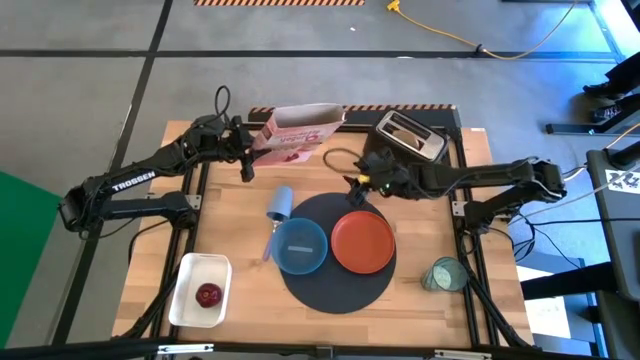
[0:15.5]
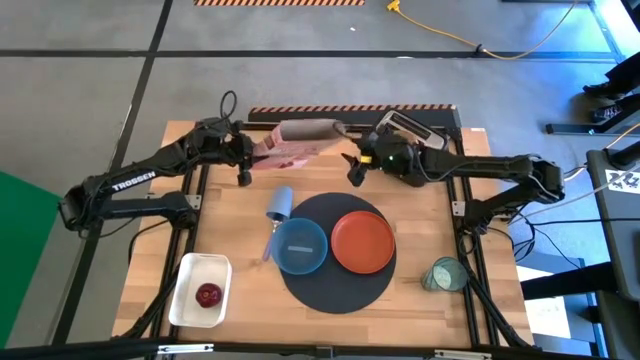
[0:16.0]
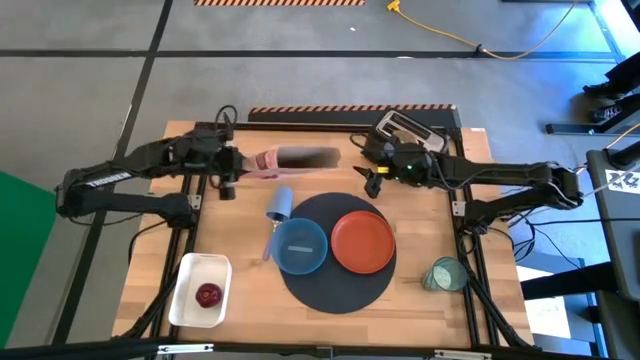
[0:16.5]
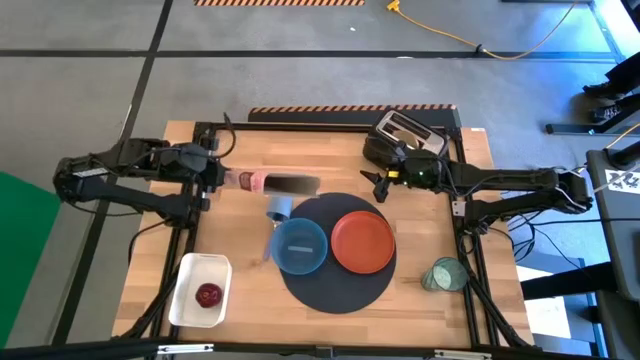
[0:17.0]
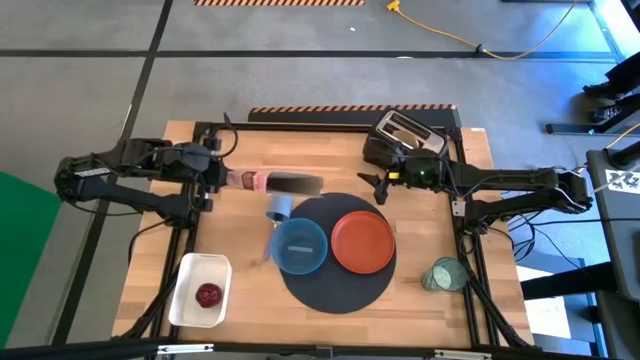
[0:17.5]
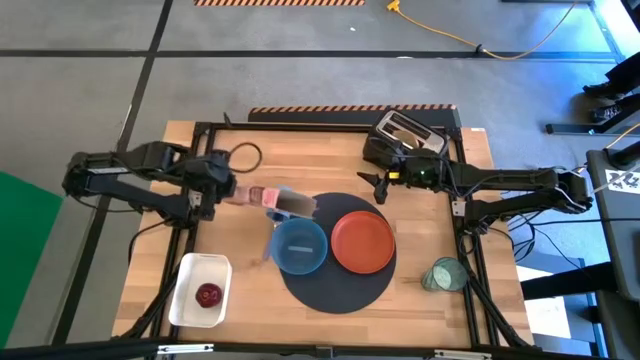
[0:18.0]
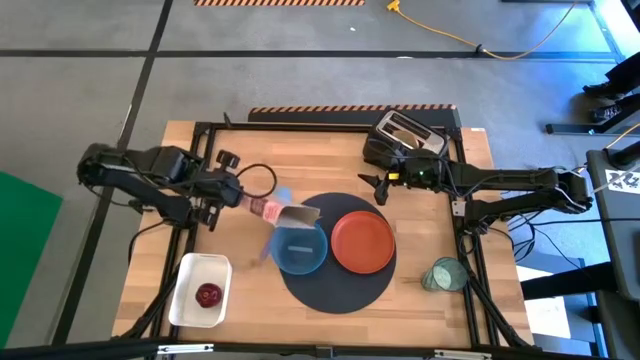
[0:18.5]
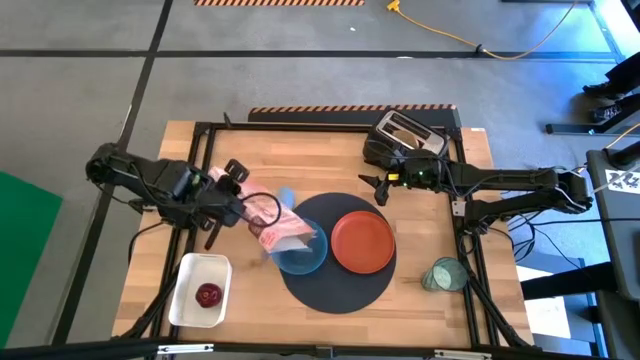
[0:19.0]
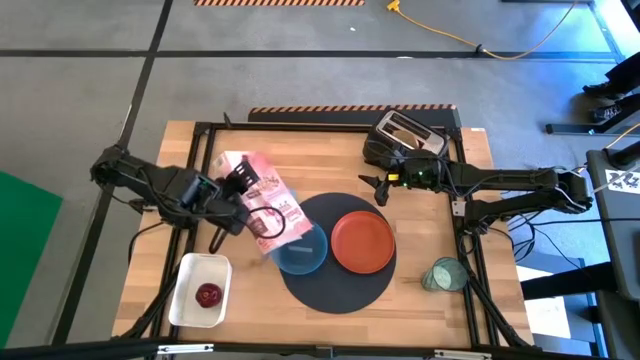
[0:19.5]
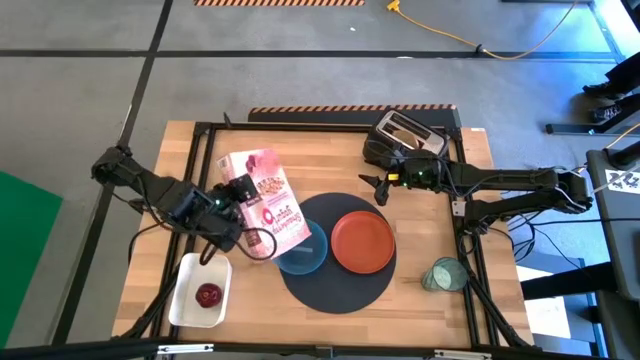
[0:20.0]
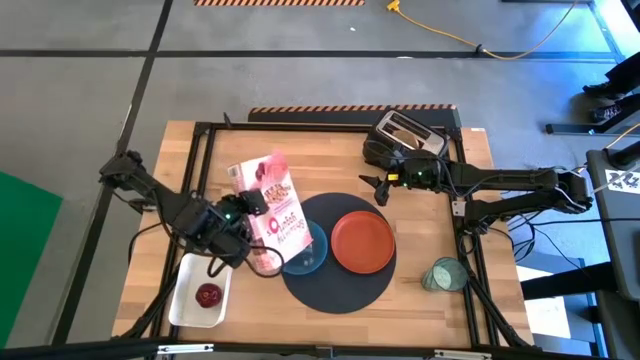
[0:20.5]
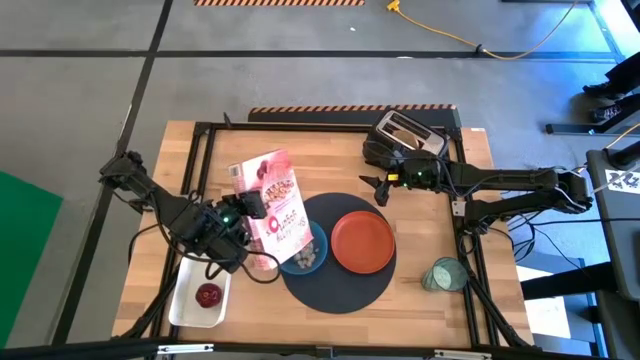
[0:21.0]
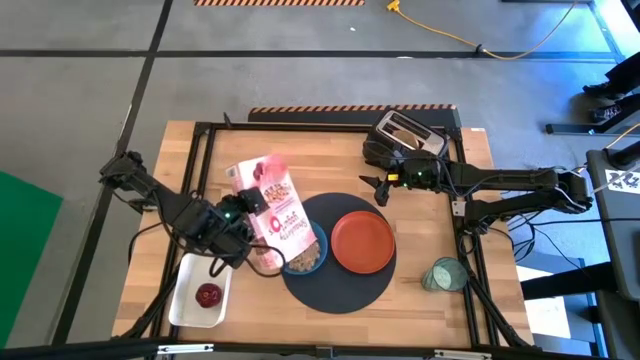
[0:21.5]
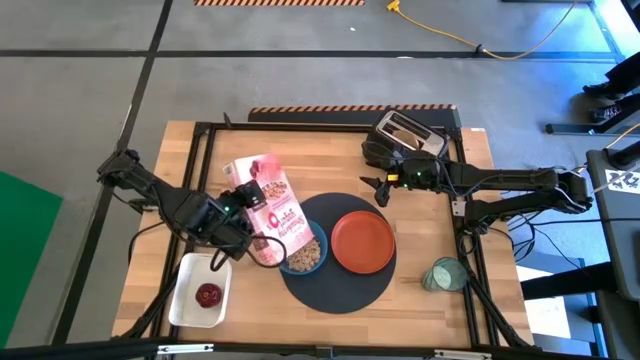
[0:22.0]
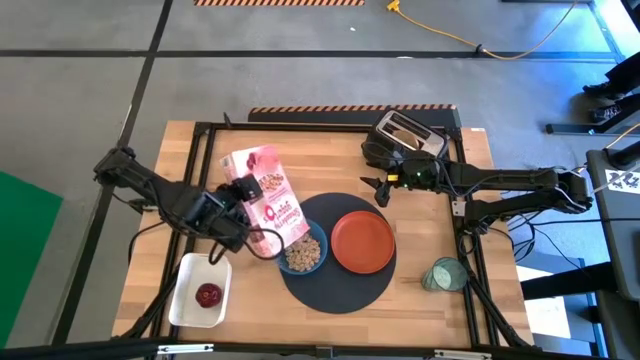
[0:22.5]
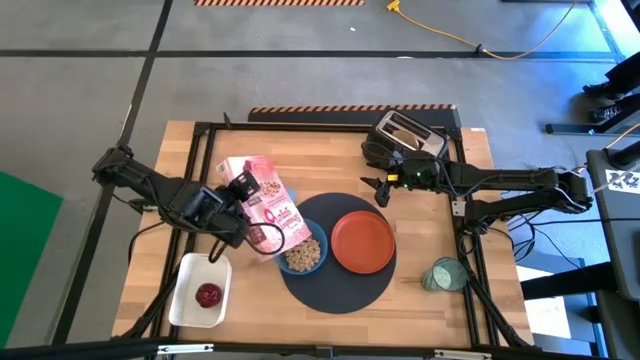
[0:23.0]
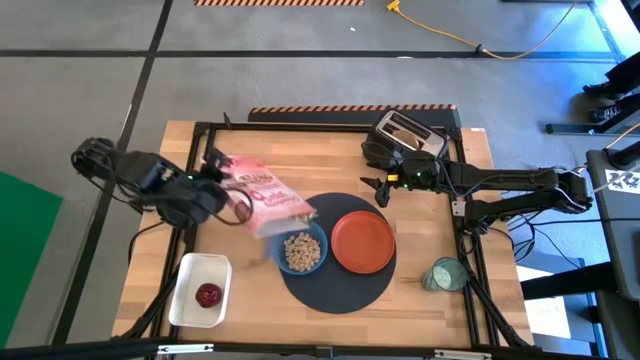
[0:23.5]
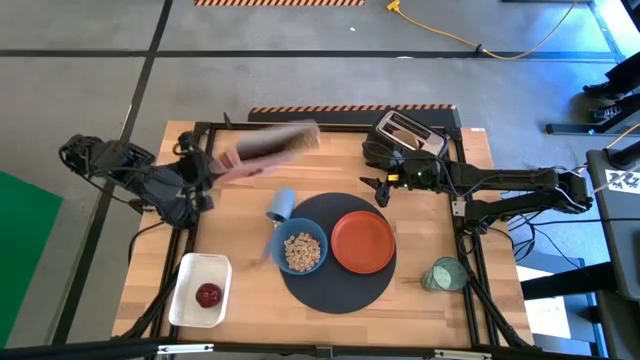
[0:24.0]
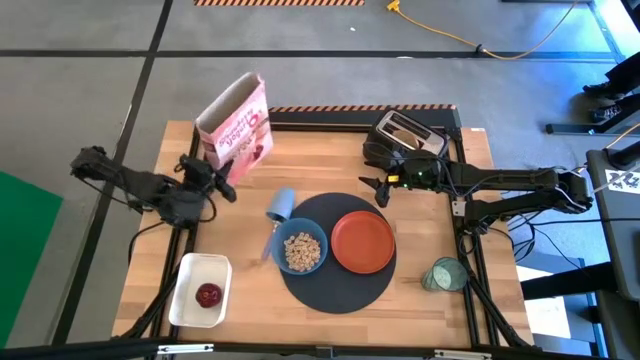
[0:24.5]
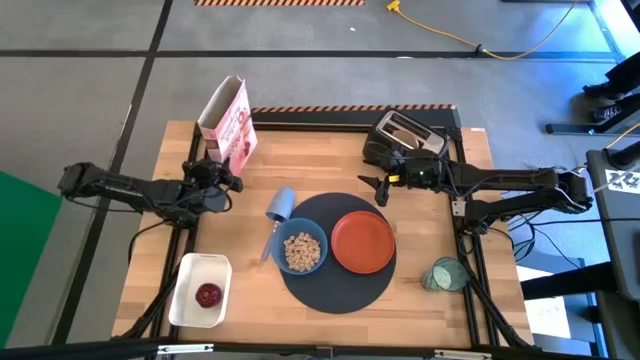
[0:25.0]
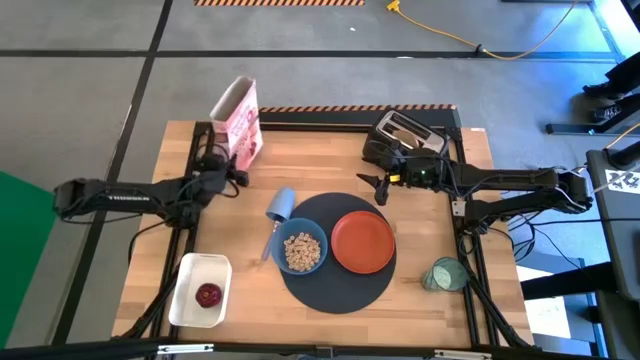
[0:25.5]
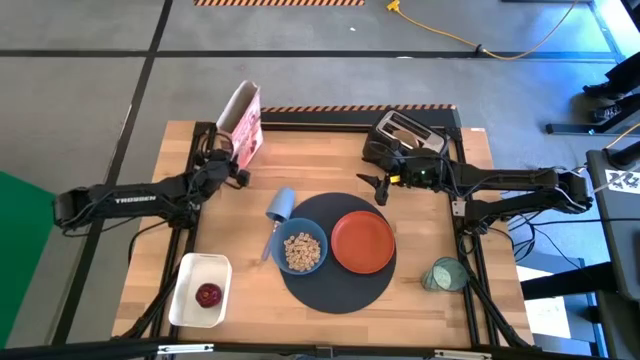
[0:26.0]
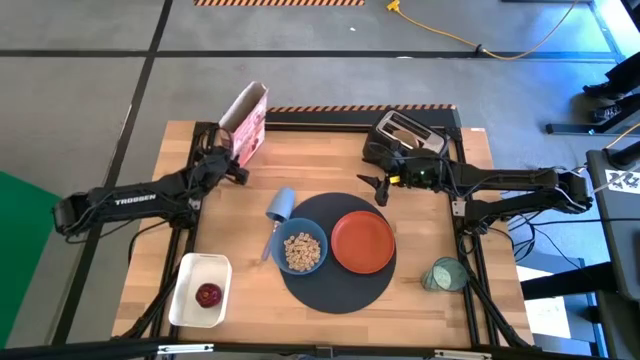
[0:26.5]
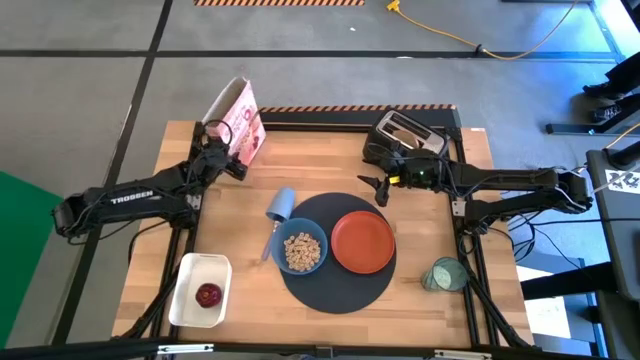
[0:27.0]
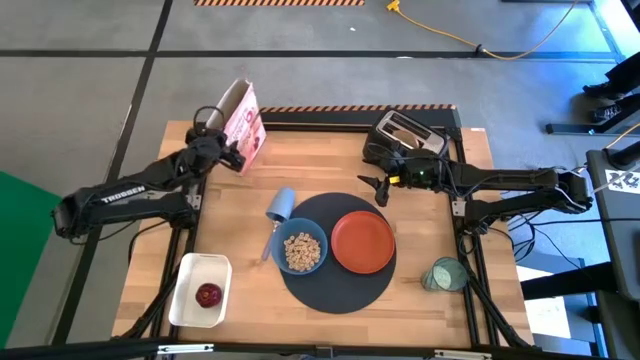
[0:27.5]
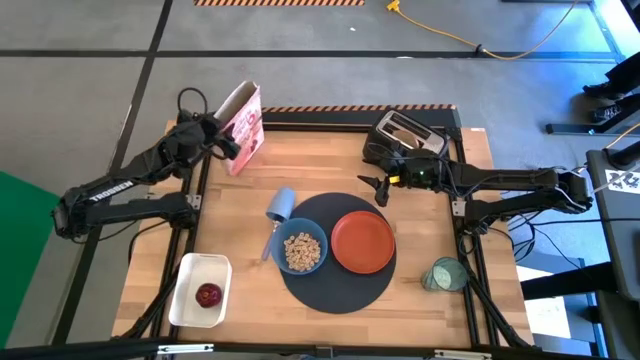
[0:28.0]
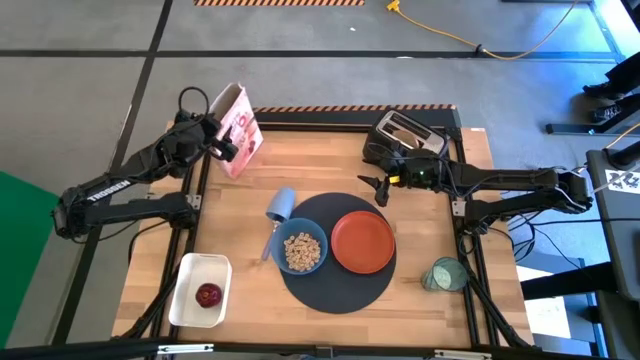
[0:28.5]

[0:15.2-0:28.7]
Task: Arrange a breakfast setting
Pour the cereal from the cereal box into the blue bowl

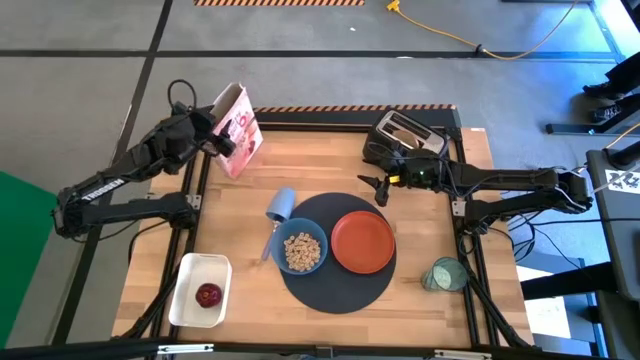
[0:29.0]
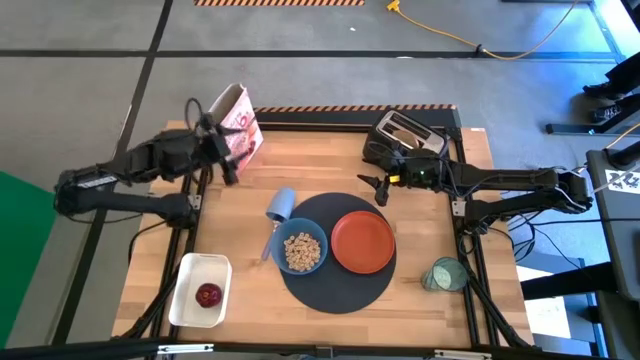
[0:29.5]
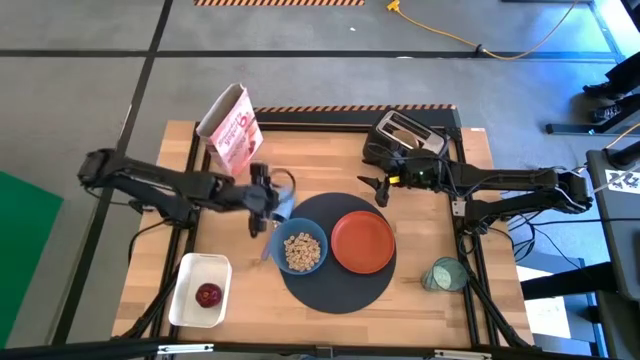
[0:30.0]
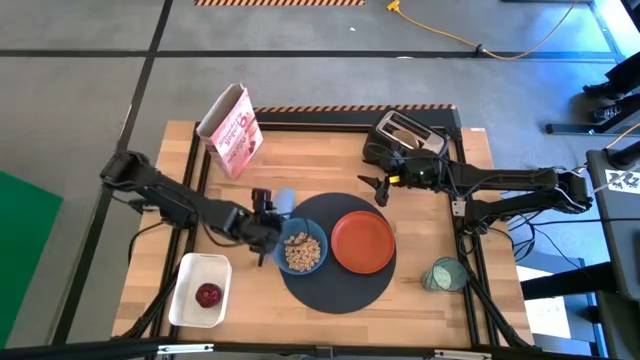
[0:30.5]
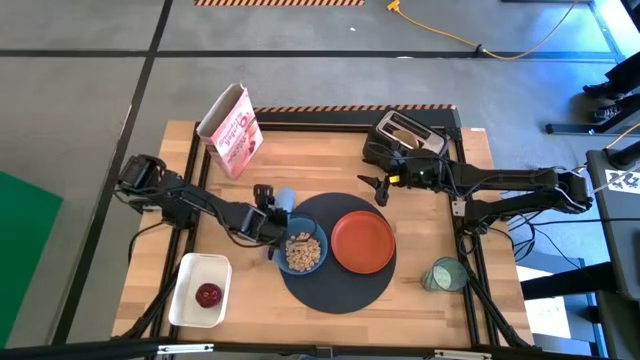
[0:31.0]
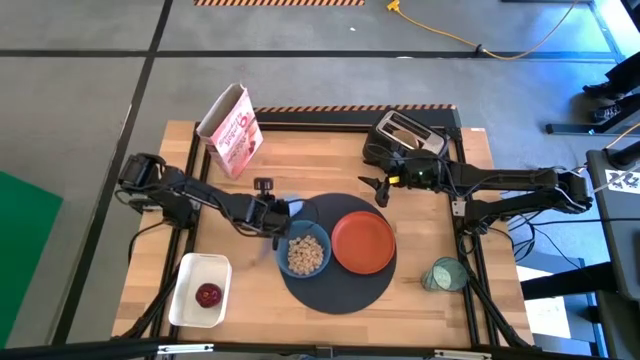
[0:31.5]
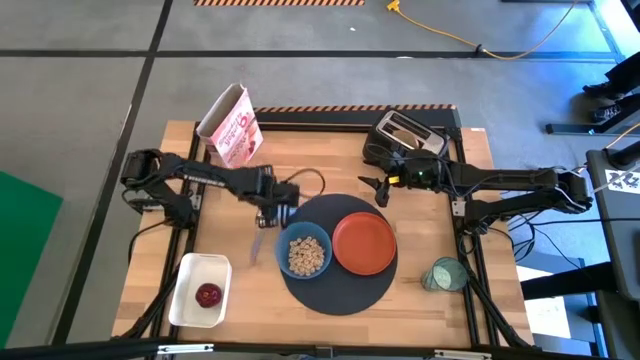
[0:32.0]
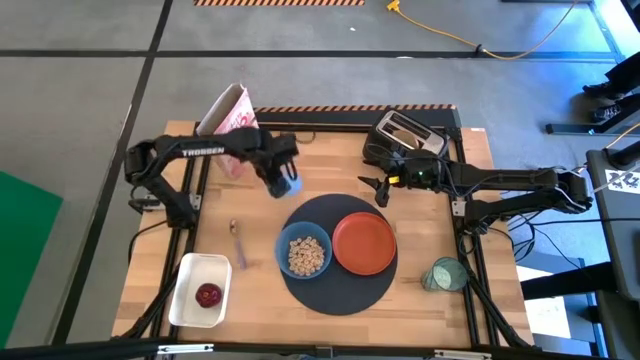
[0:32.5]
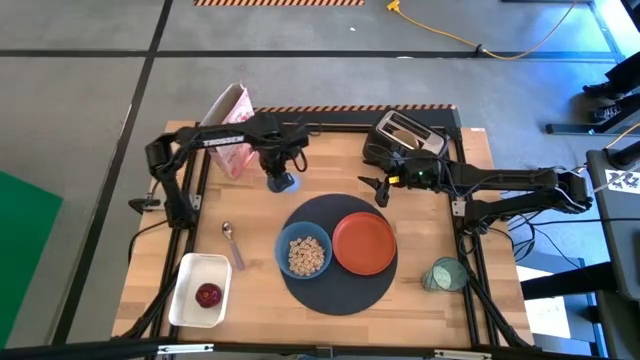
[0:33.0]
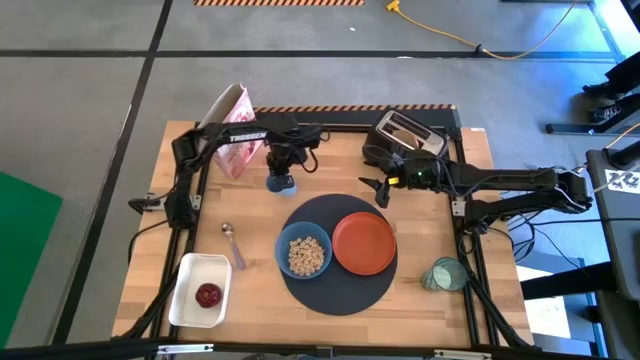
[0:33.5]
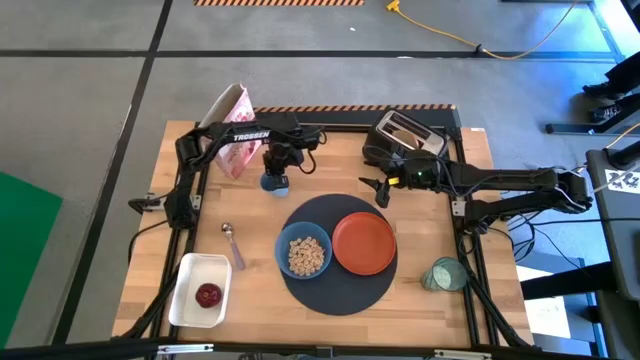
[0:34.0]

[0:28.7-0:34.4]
Adjust the blue cup

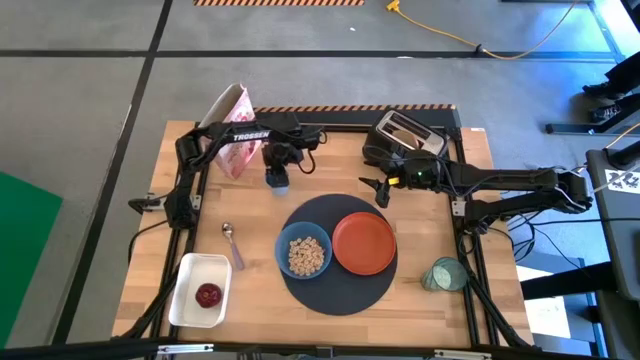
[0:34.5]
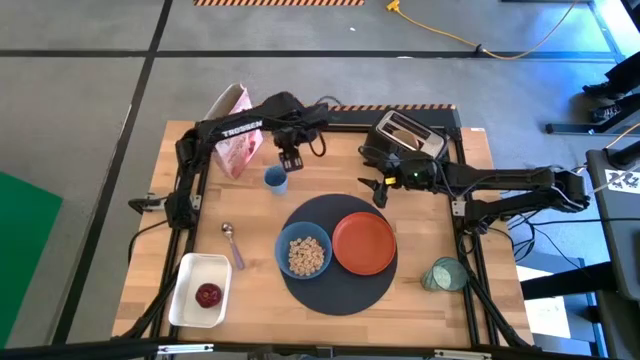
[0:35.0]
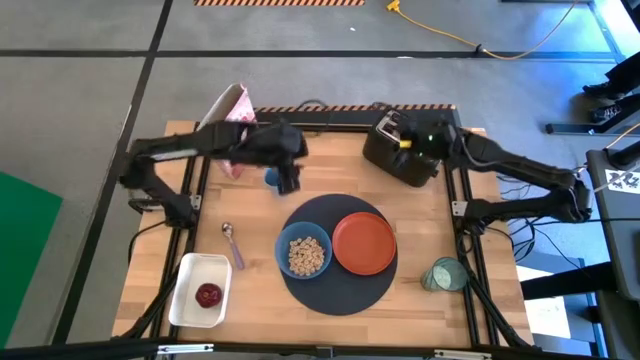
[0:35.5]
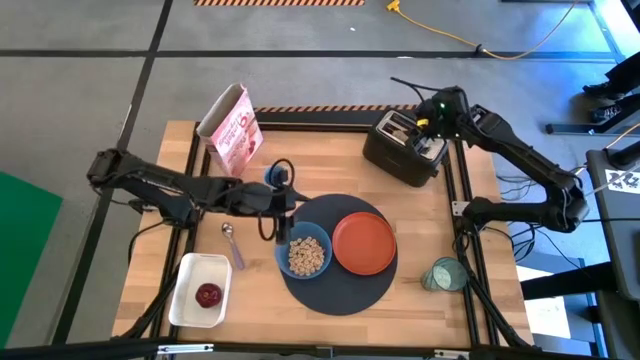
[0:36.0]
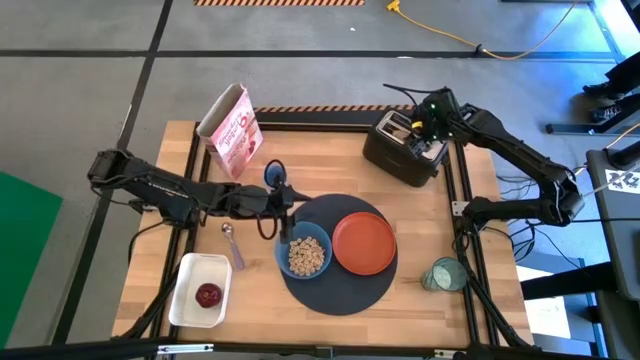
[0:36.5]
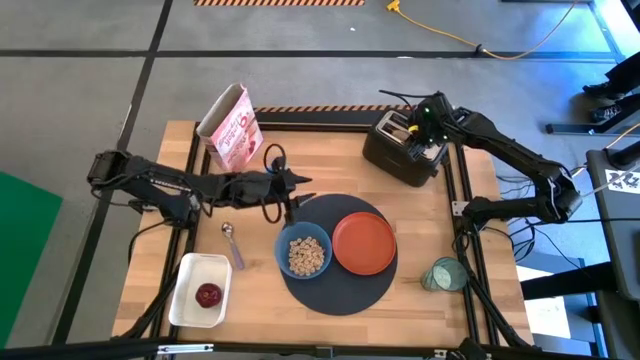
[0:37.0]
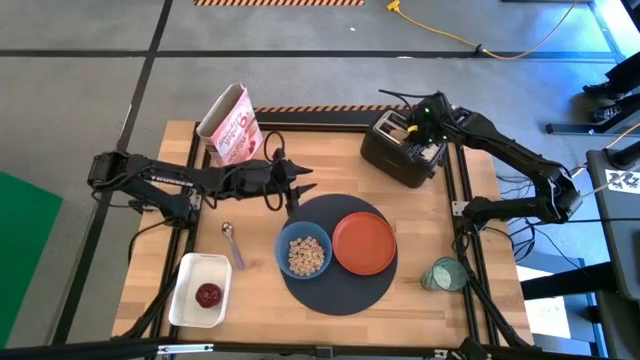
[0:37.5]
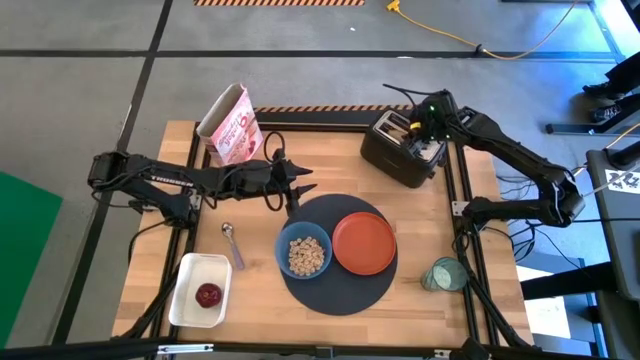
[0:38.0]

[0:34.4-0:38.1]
Put the bagel on the orange plate
